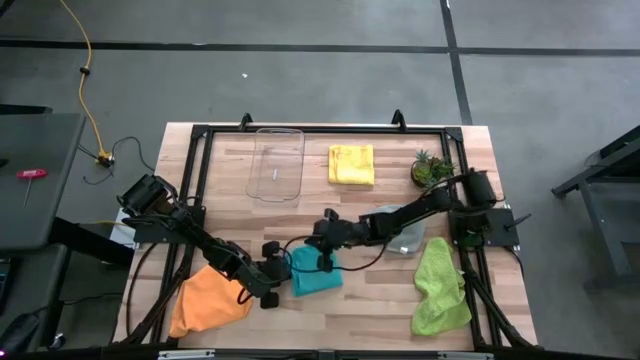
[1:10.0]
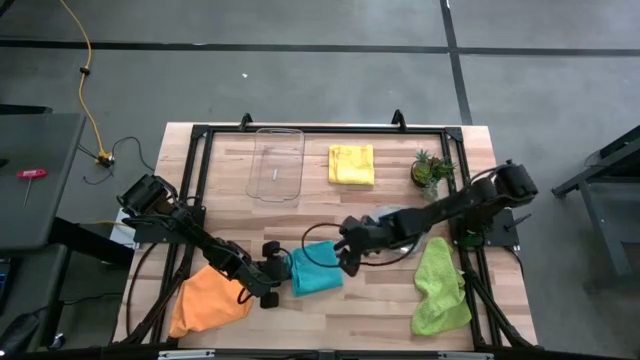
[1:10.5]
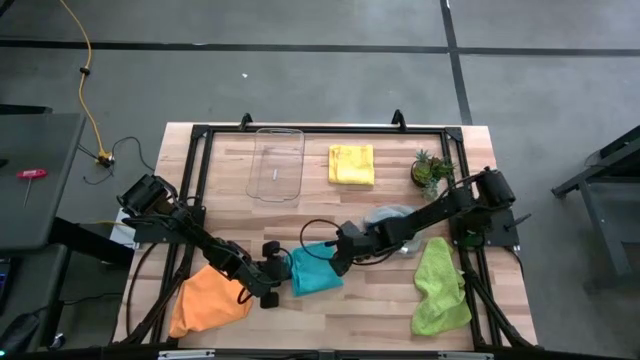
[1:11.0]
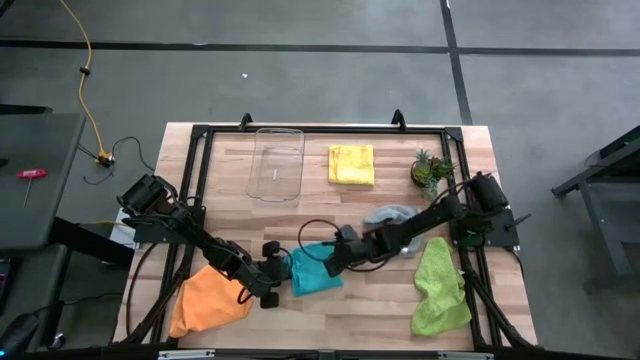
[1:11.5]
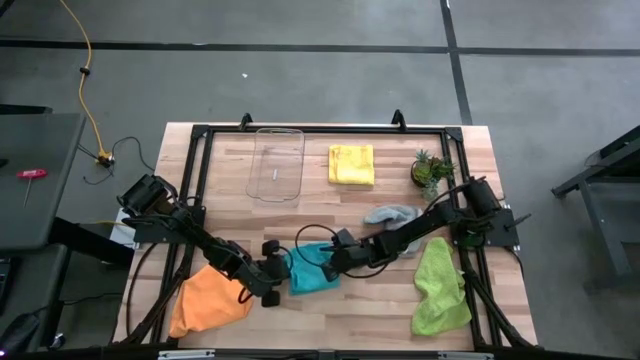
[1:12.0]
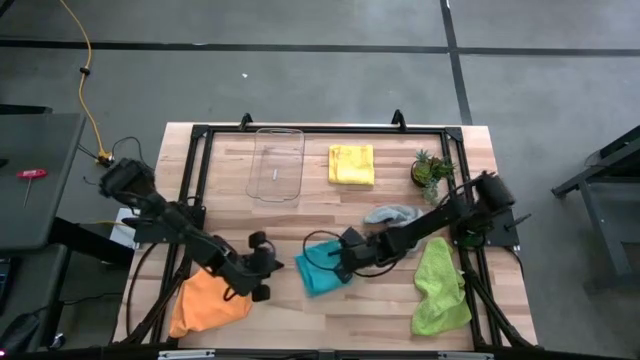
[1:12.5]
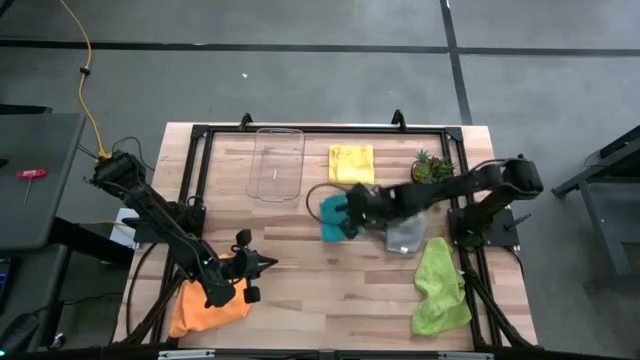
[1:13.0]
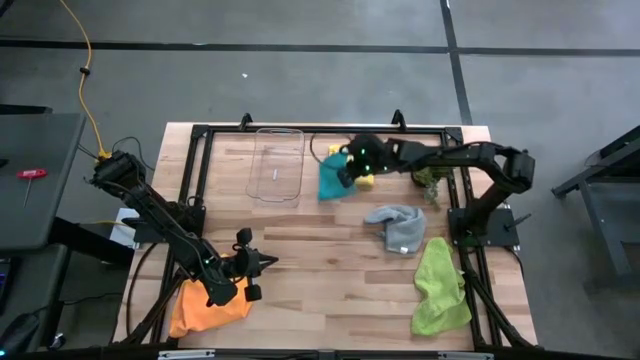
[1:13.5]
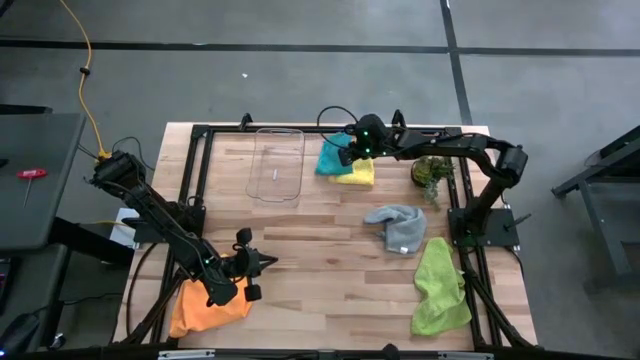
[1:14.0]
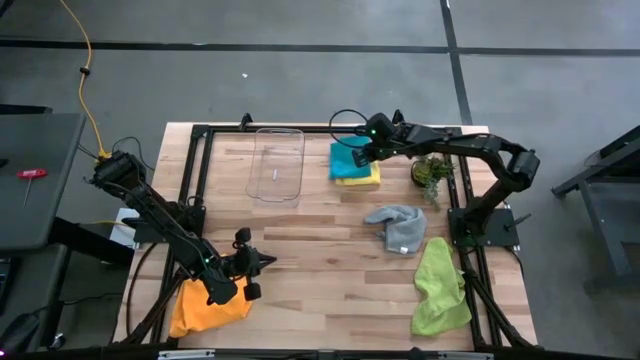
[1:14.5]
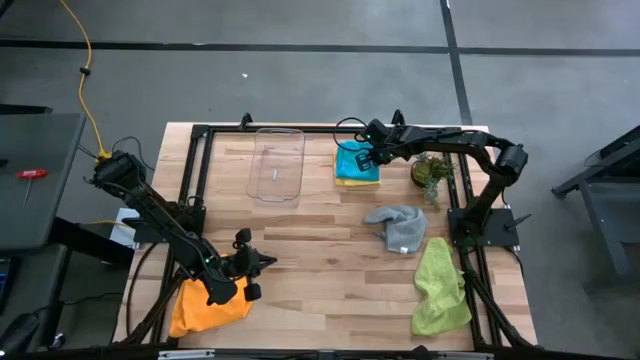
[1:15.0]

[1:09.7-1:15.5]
Task: Fold microfiber towels
Stack the blue microfiber cloth on the yellow microfiber cloth

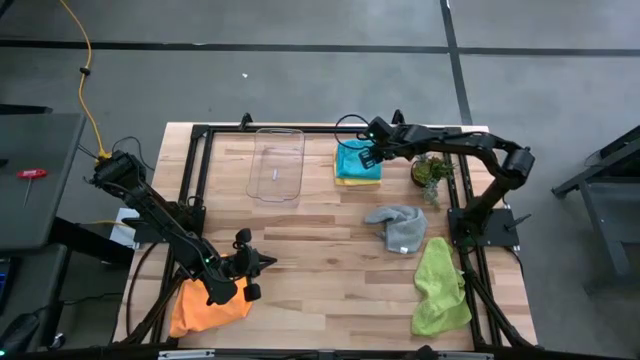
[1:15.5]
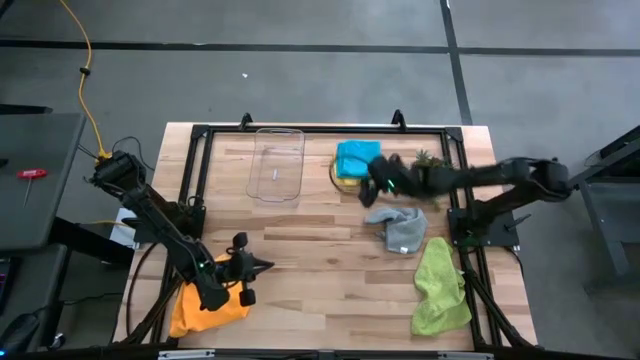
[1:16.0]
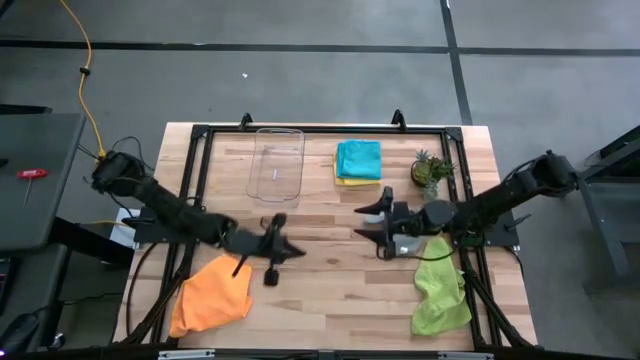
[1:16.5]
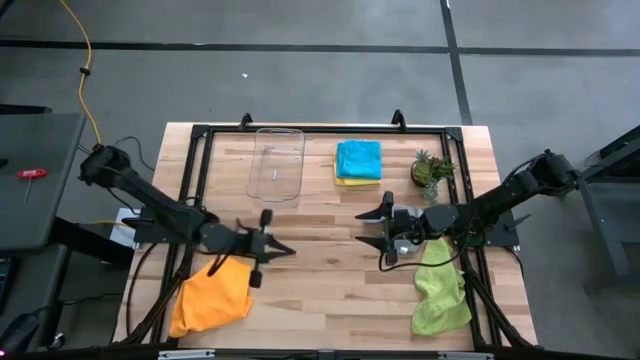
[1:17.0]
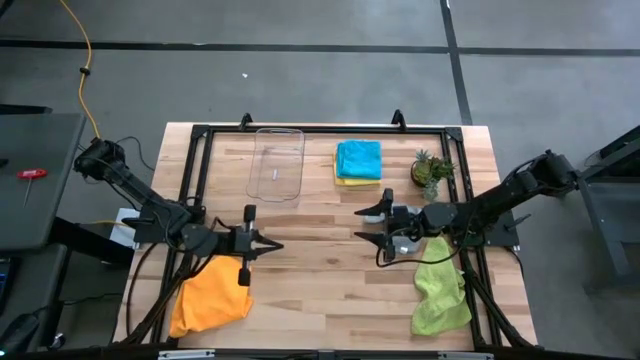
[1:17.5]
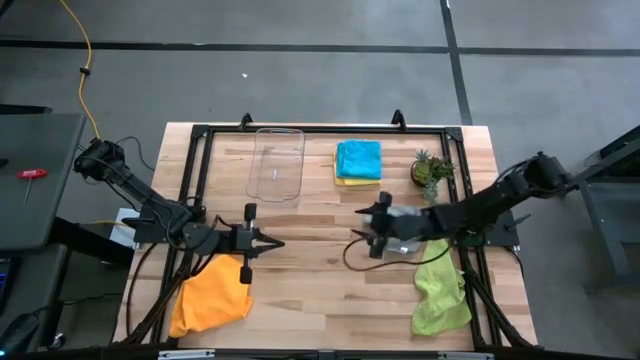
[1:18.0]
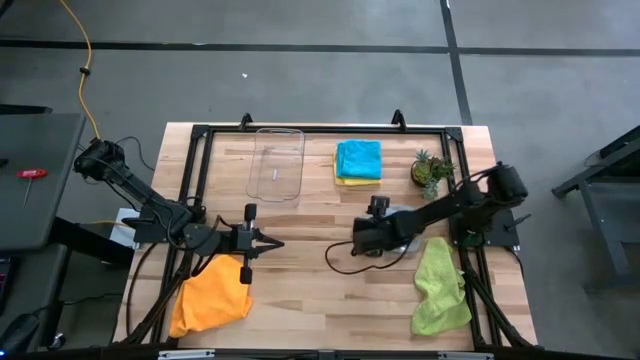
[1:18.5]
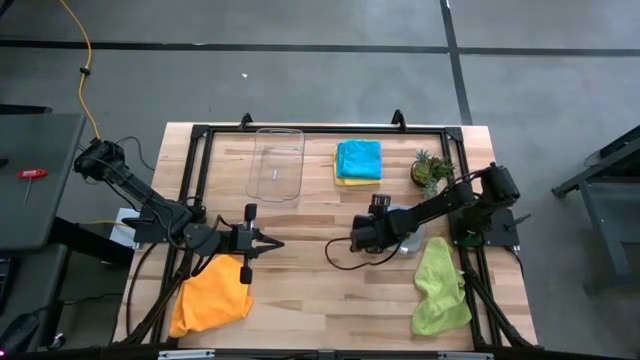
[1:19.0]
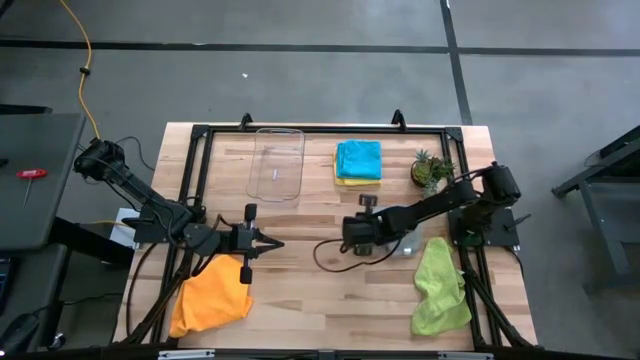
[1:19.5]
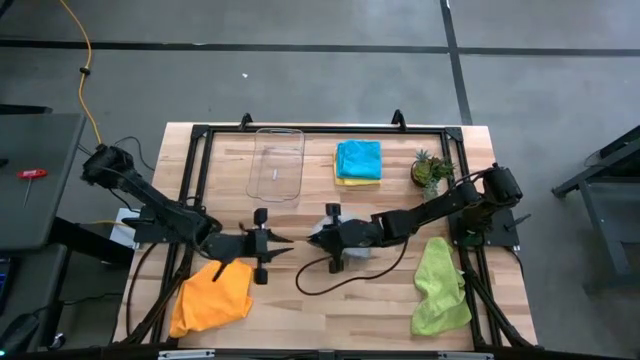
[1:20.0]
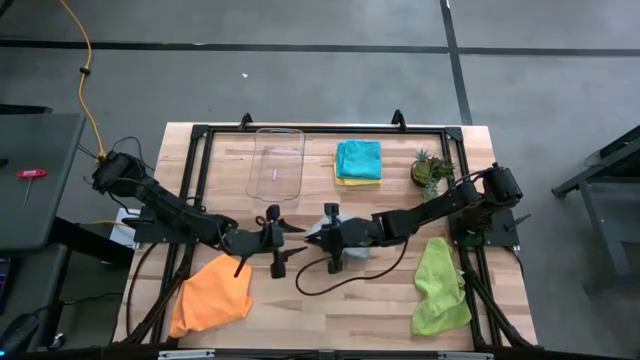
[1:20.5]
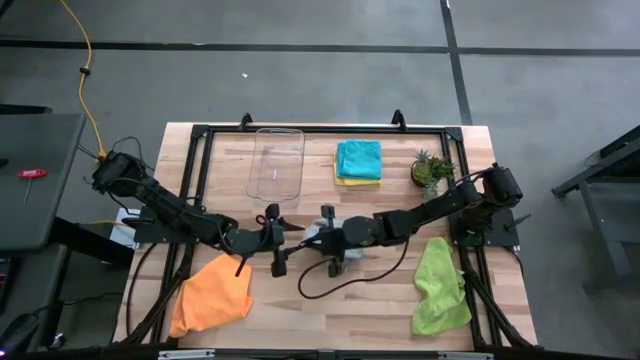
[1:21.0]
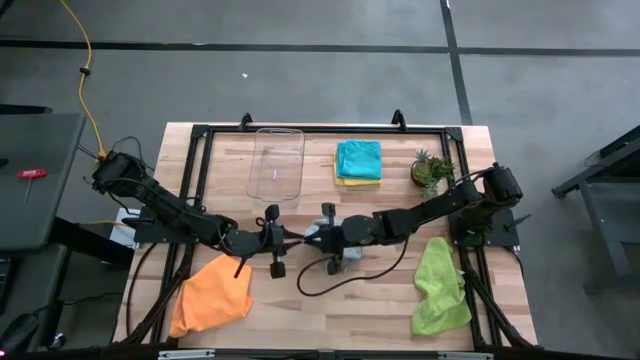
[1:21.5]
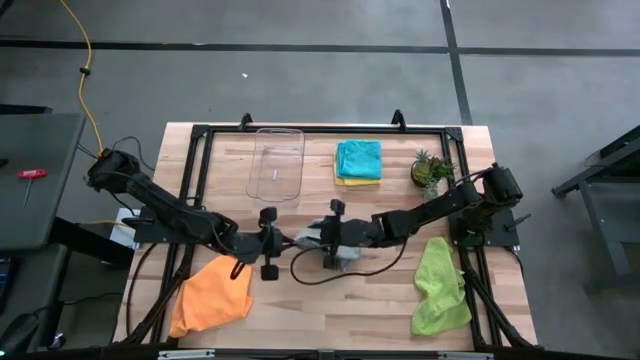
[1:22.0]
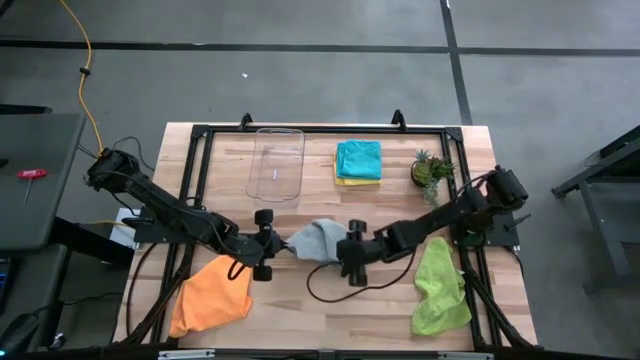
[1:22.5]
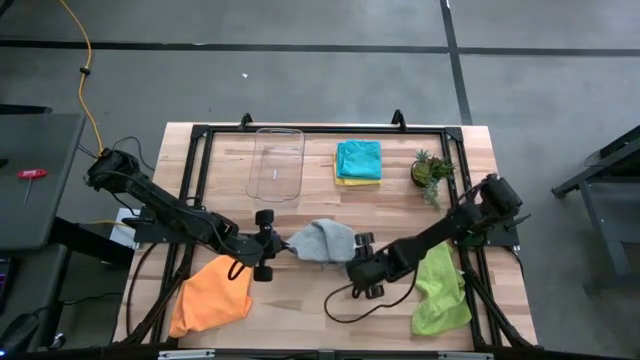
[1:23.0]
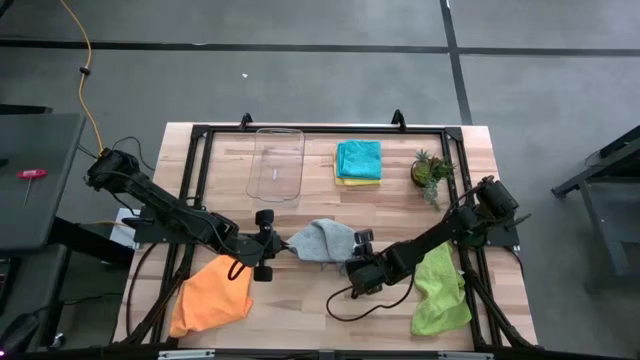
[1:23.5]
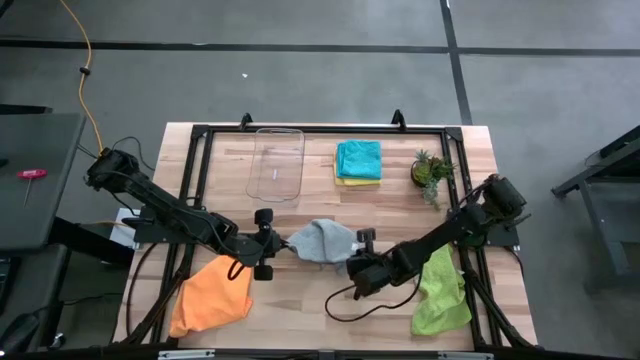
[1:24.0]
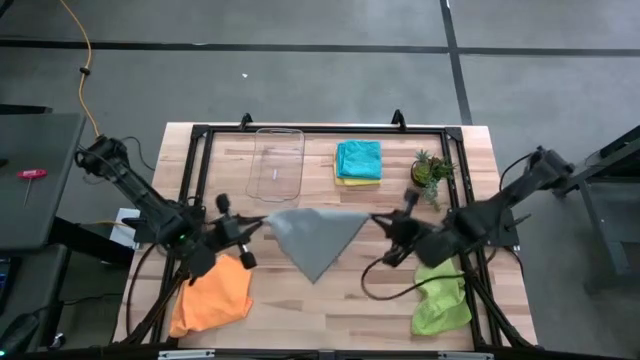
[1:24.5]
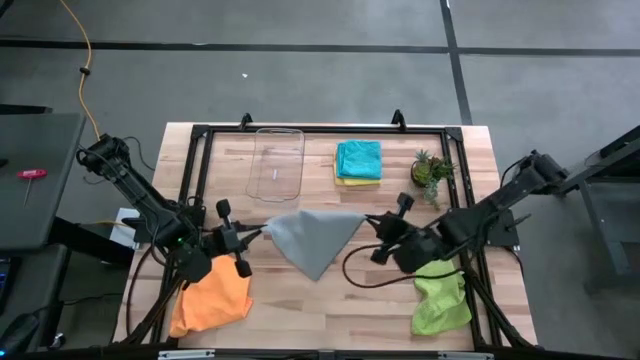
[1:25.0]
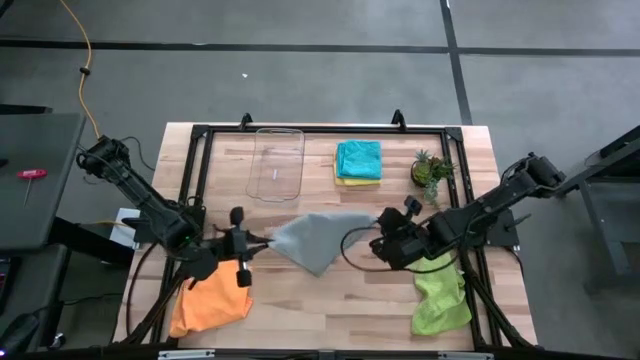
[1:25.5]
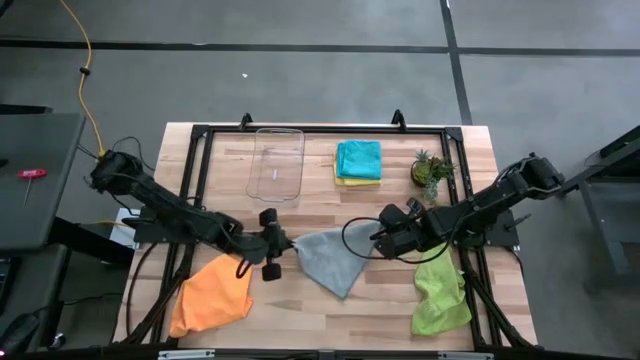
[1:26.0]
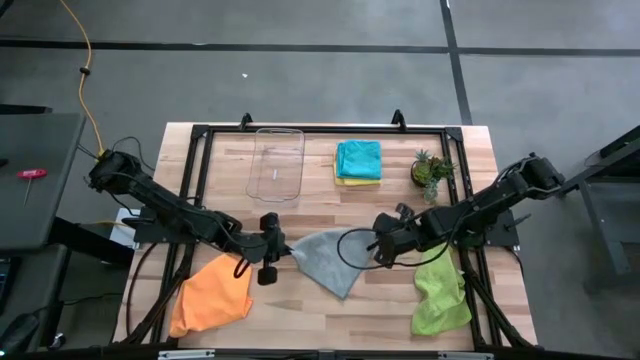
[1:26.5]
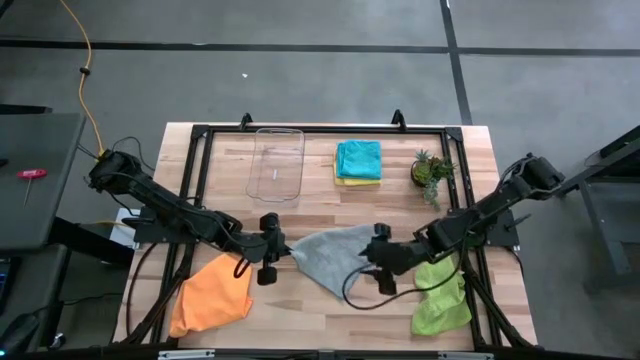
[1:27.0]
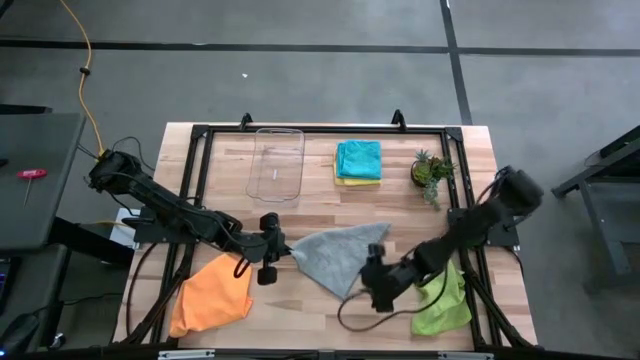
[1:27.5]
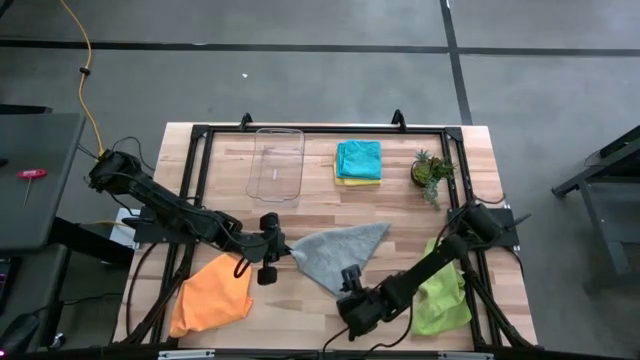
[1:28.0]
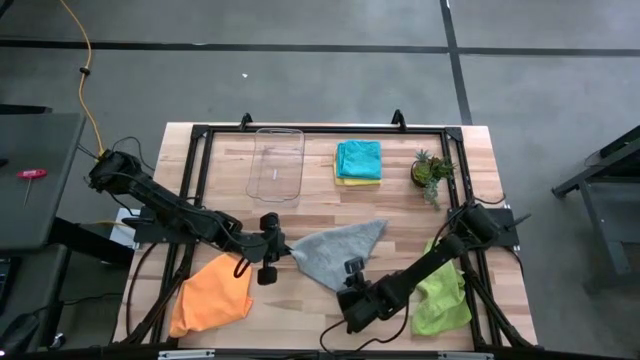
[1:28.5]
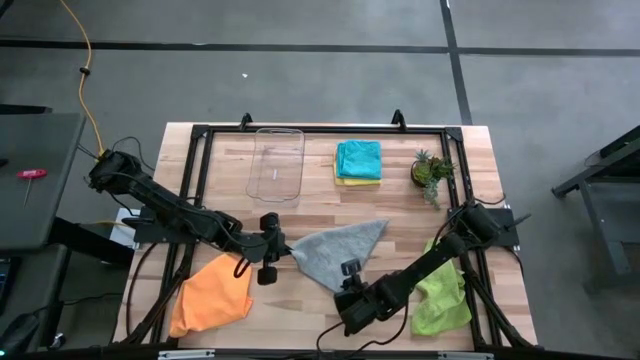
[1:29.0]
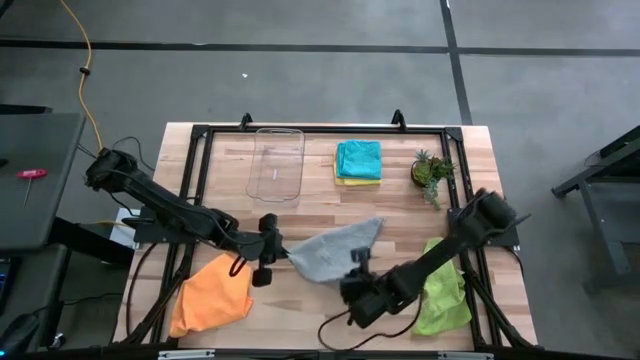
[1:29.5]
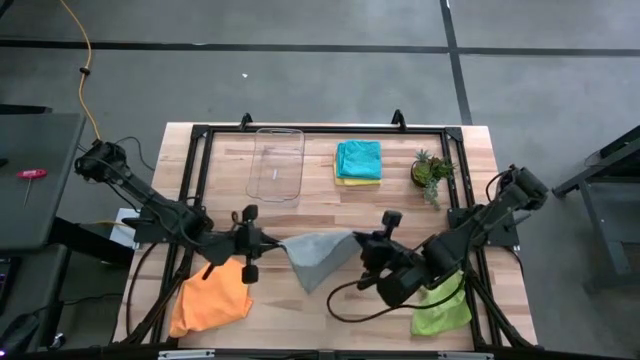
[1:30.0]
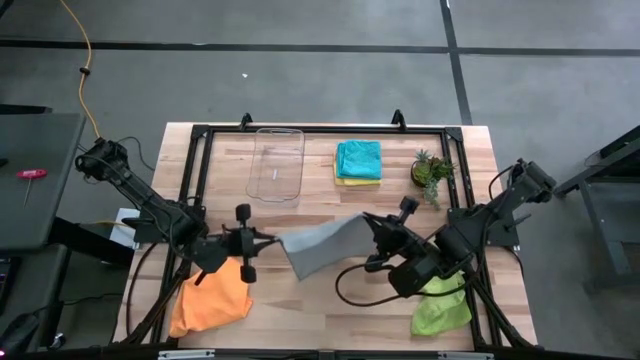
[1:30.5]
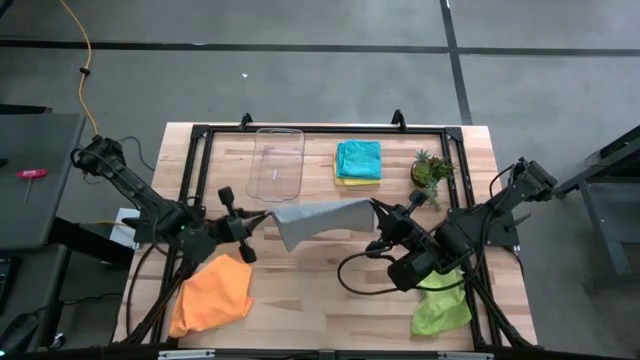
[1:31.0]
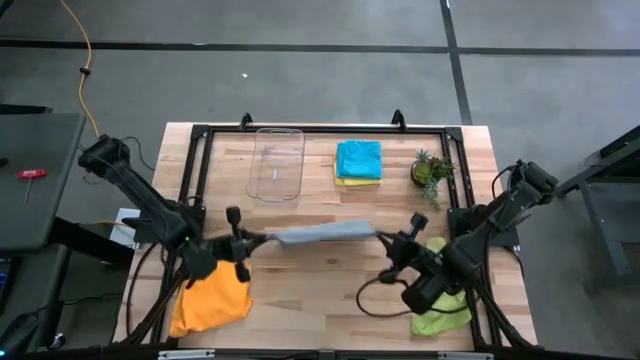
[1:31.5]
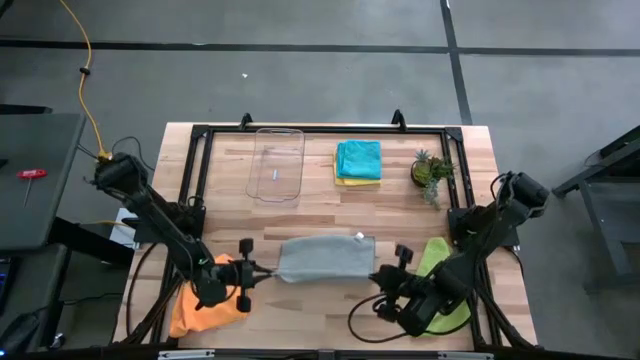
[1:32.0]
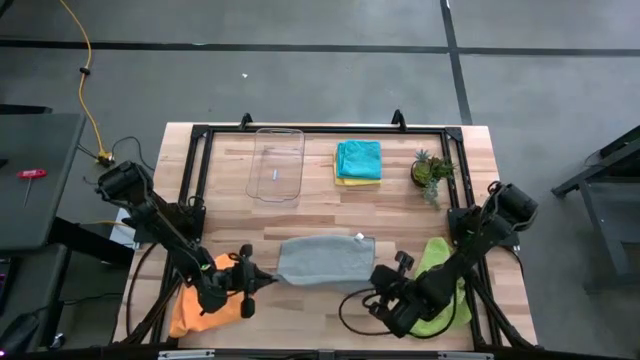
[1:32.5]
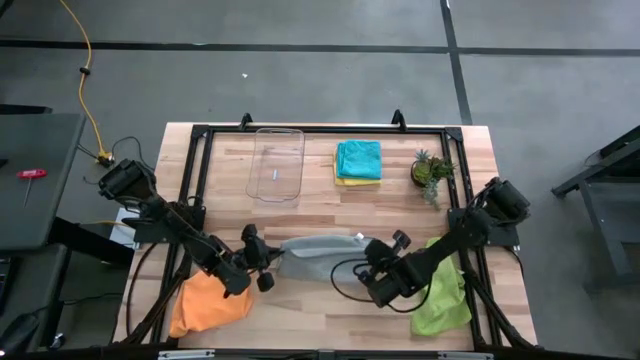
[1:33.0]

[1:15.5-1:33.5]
Fold the gray microfiber cloth
